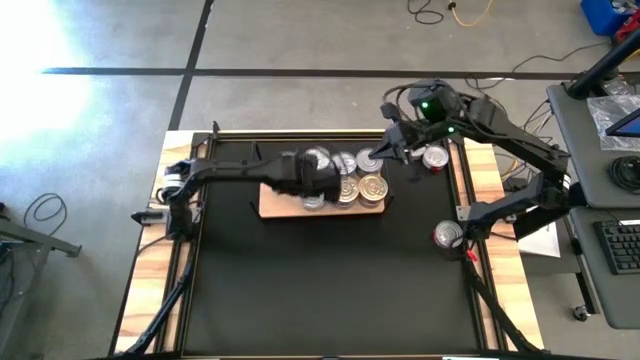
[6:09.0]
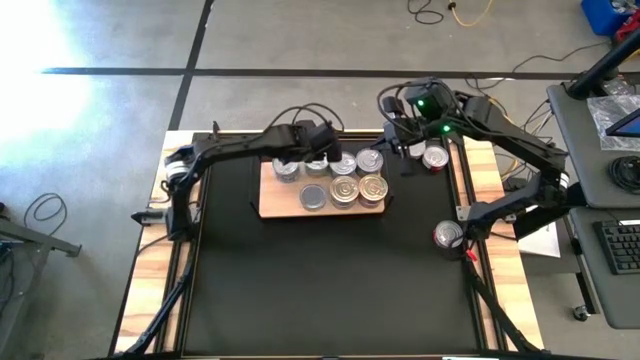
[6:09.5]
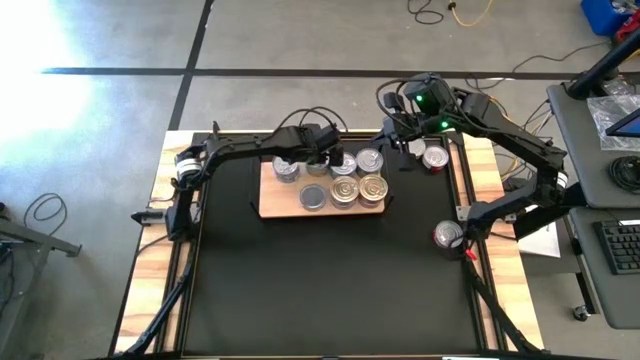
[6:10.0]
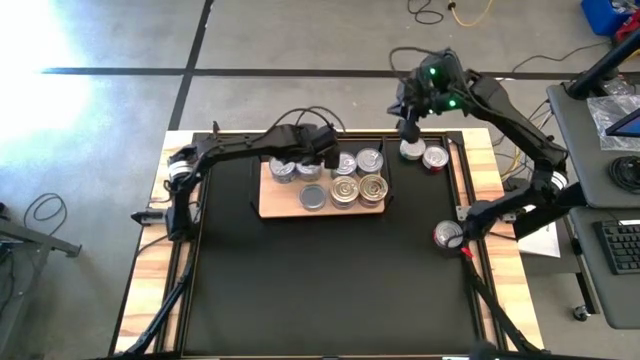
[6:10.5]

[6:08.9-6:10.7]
Task: Stack canned seafood by type on shelf
Adjust the stack of light blue tuna cans

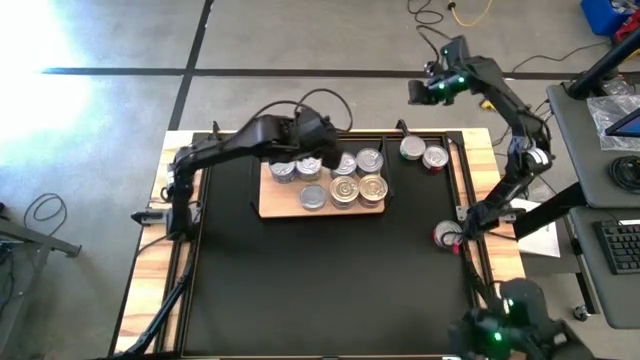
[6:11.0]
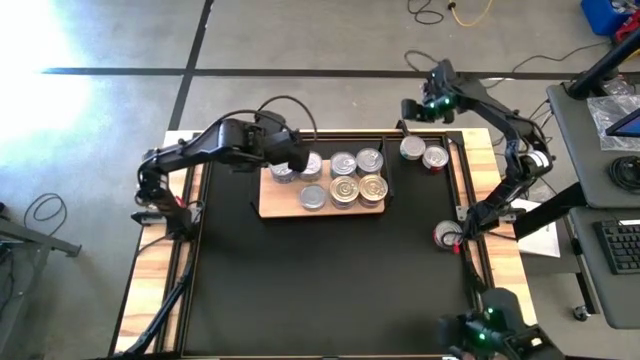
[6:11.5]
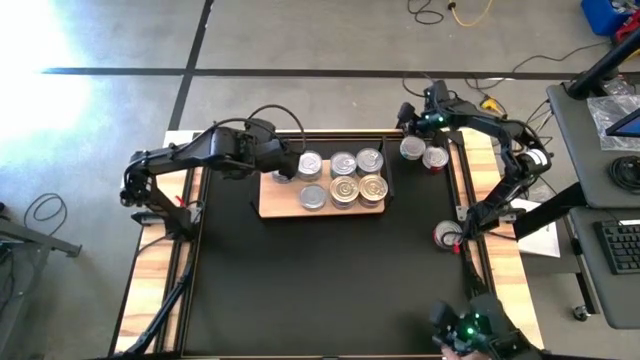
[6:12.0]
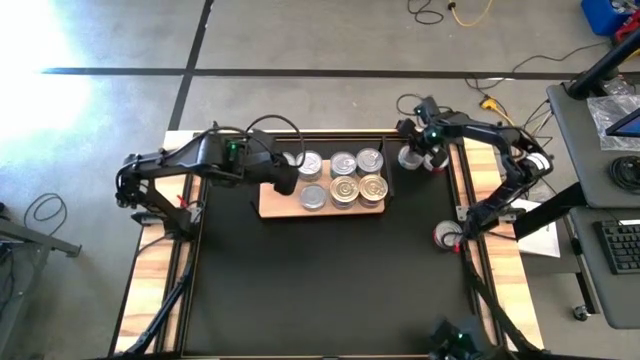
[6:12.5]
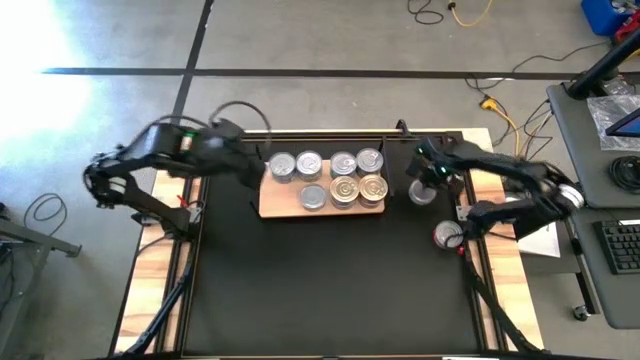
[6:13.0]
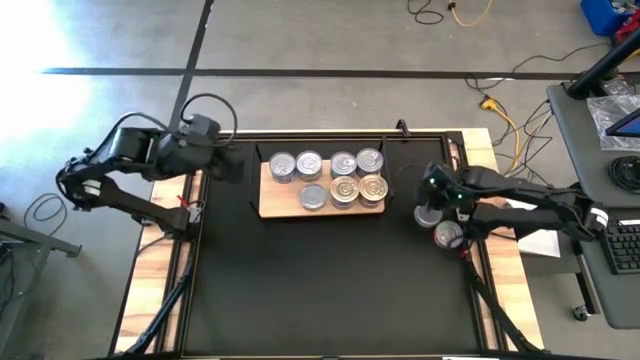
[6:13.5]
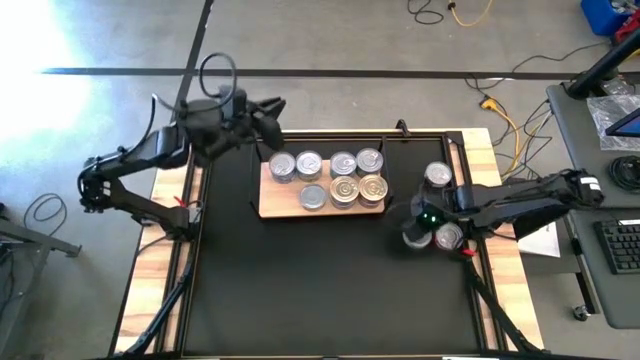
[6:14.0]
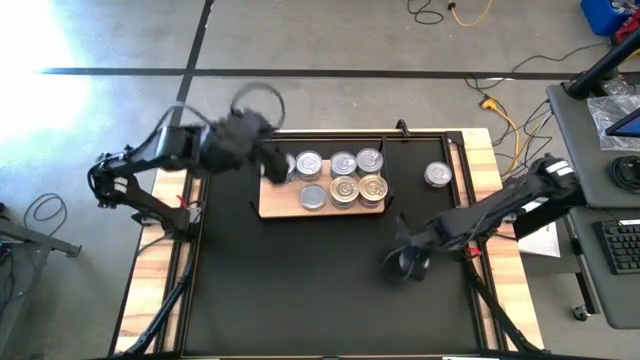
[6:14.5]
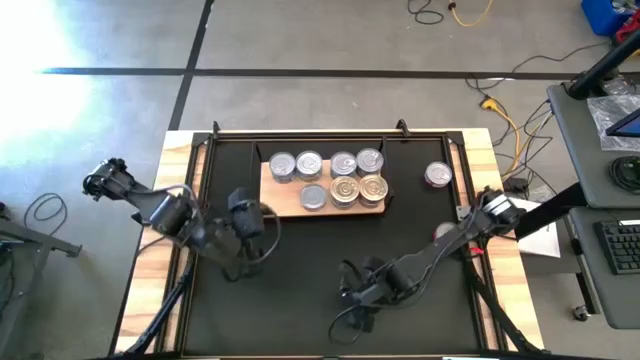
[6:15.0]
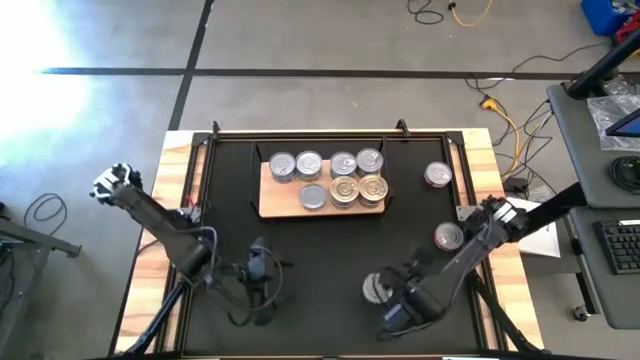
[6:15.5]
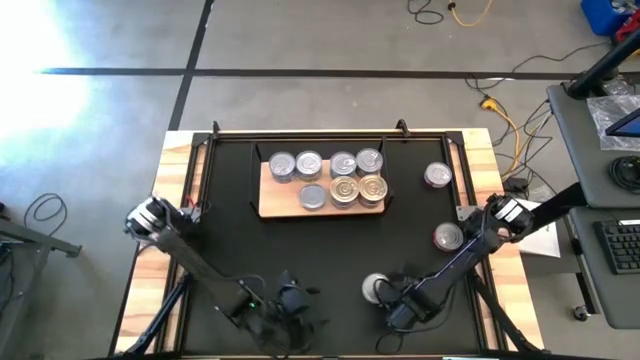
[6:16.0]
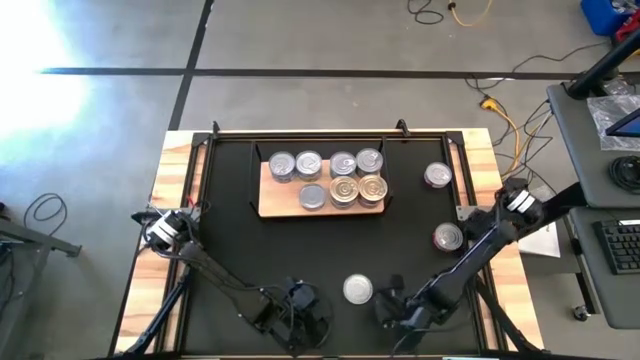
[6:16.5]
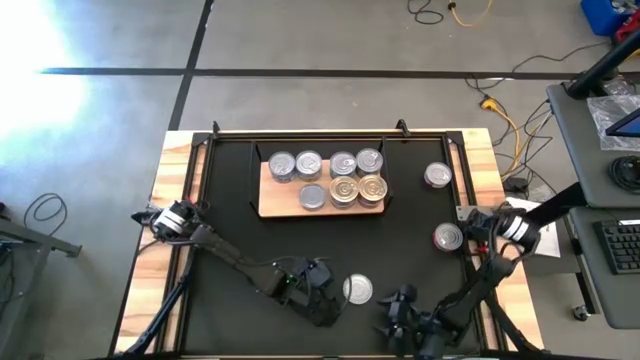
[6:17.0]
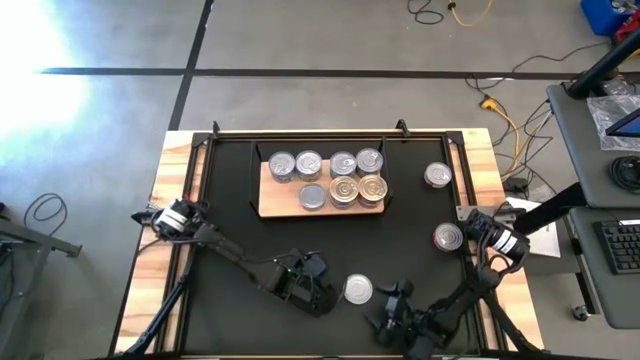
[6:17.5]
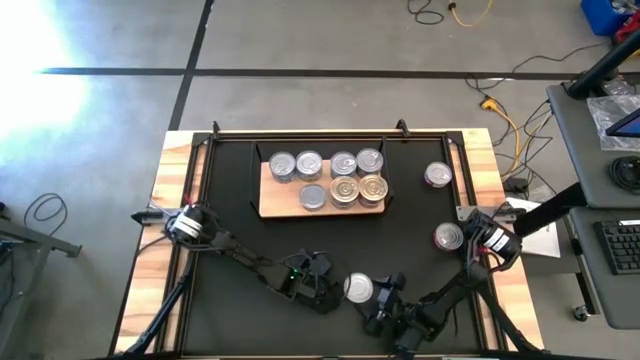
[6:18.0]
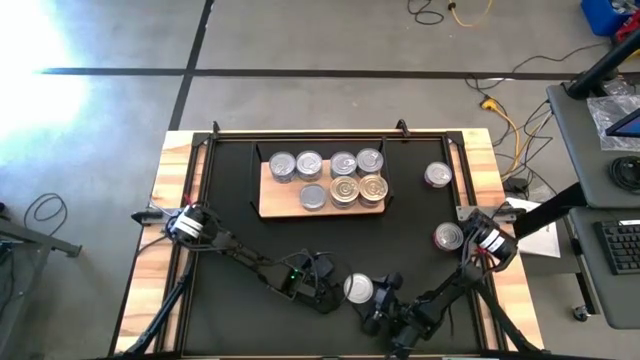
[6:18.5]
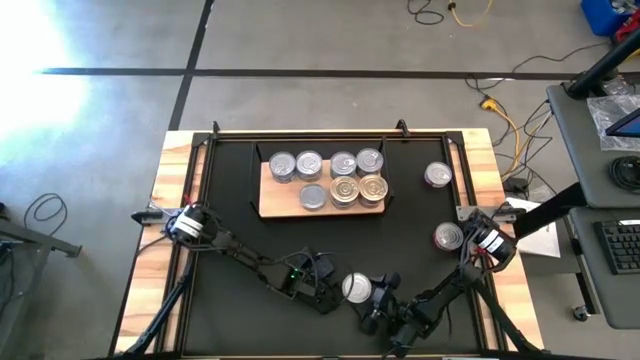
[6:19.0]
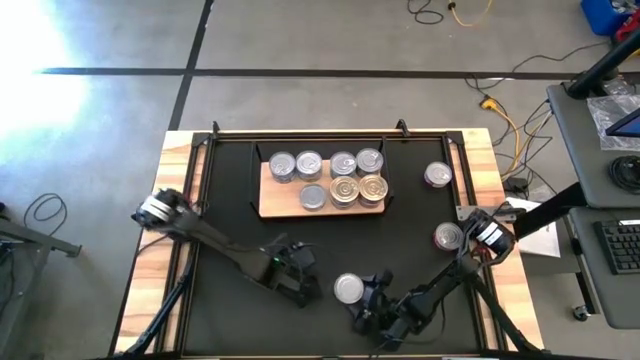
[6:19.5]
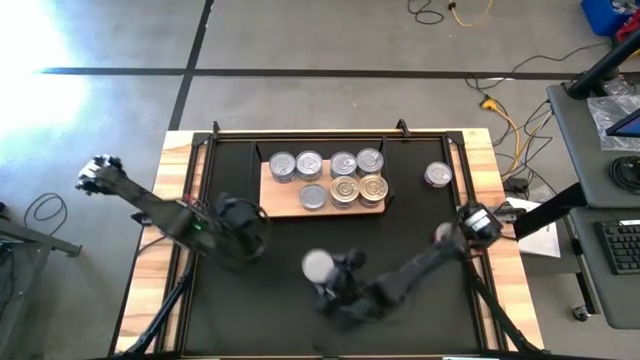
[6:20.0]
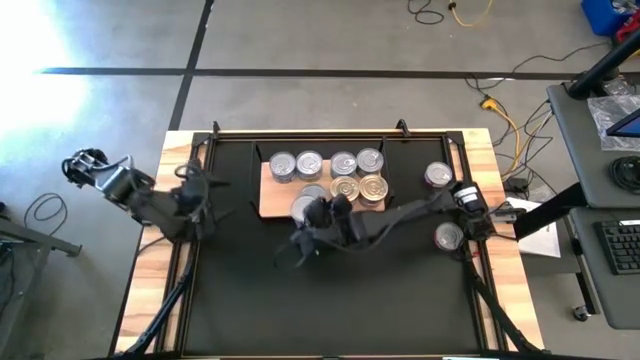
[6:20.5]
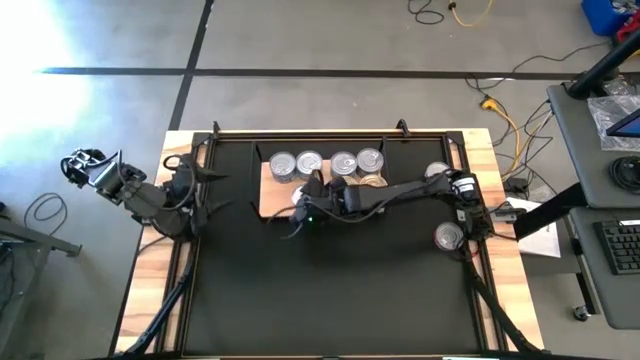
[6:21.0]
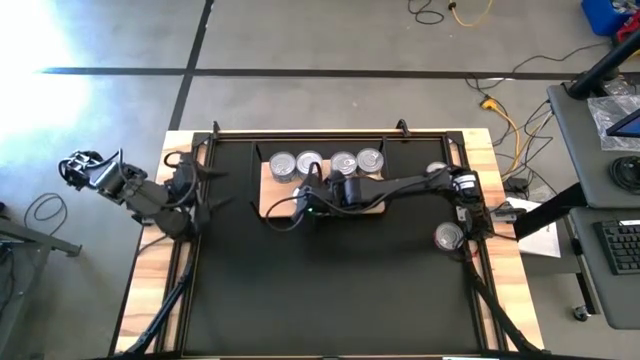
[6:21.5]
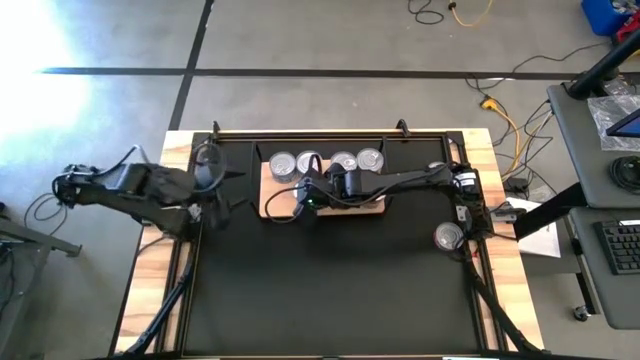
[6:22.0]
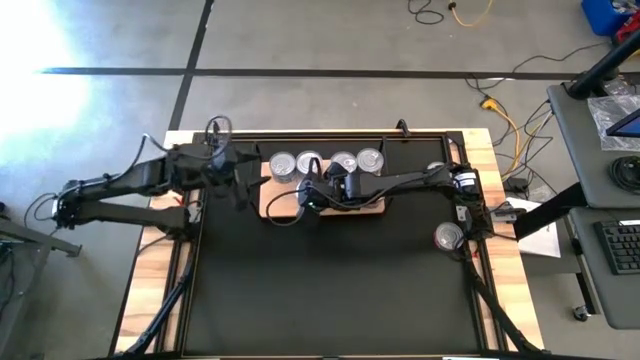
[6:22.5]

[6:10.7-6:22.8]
Stack the green and white tuna can on the green and white tuna can

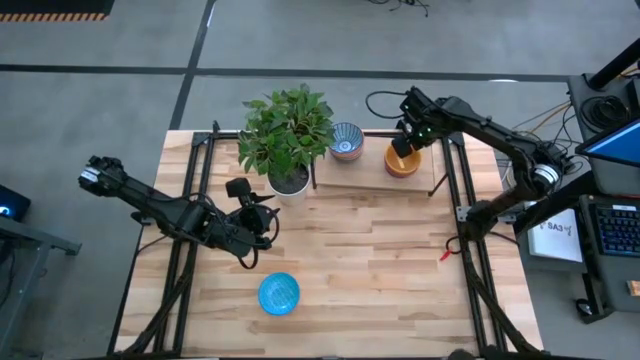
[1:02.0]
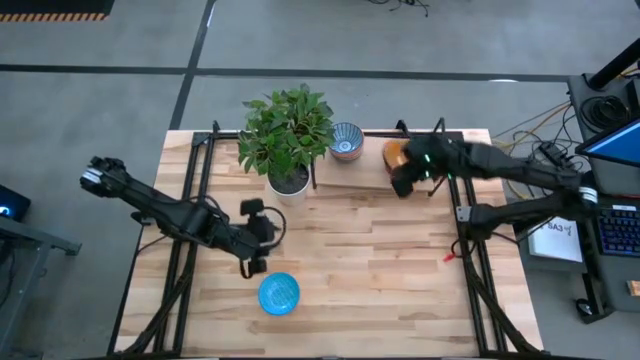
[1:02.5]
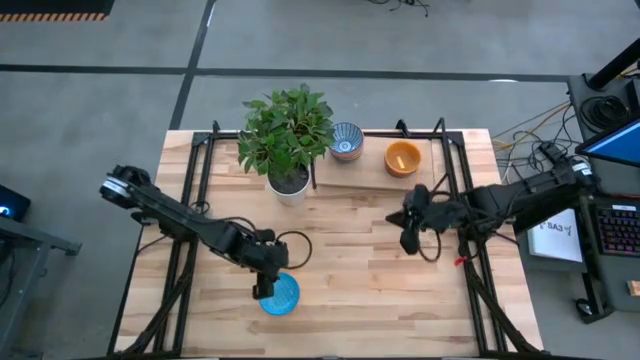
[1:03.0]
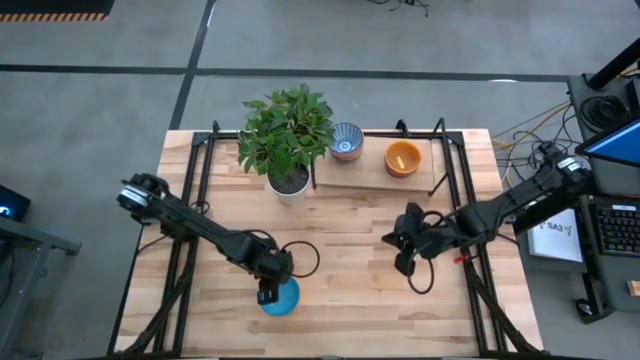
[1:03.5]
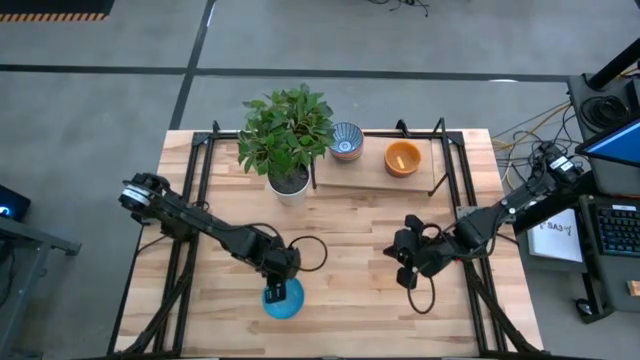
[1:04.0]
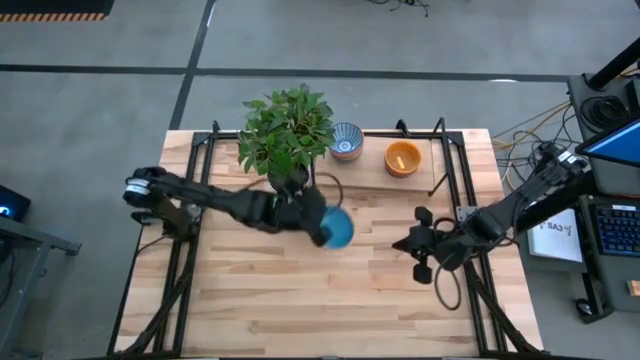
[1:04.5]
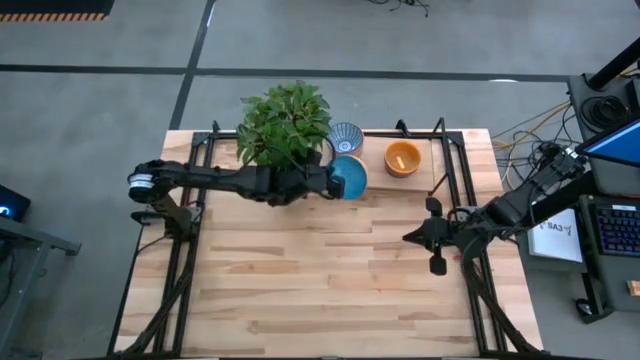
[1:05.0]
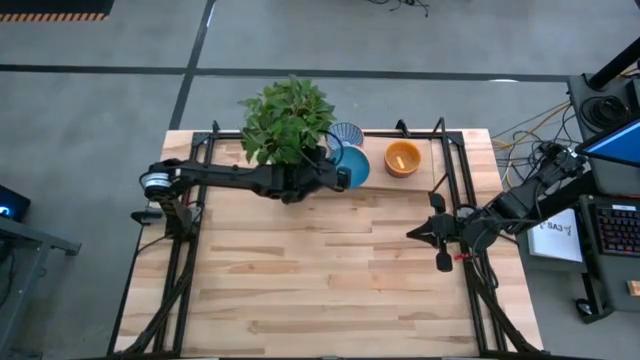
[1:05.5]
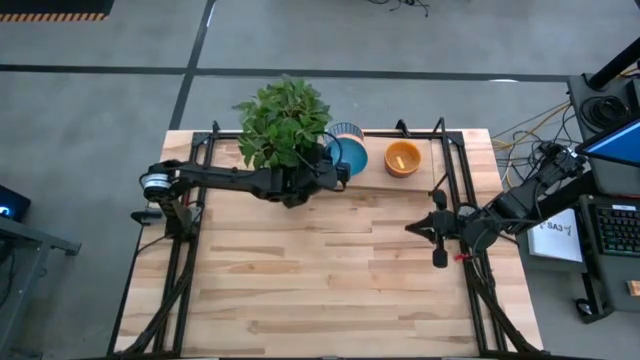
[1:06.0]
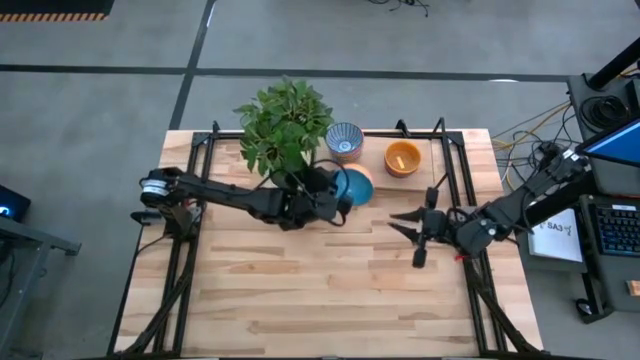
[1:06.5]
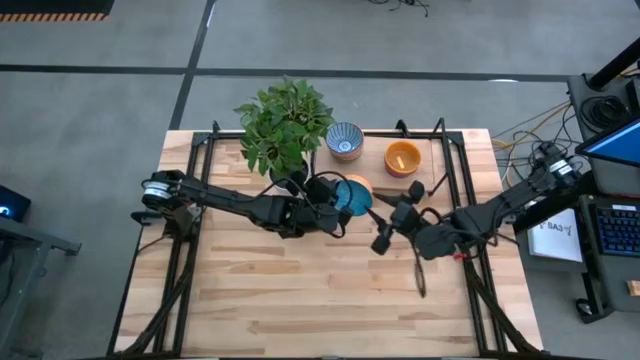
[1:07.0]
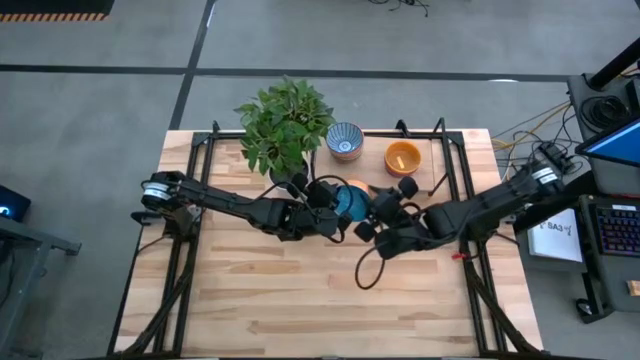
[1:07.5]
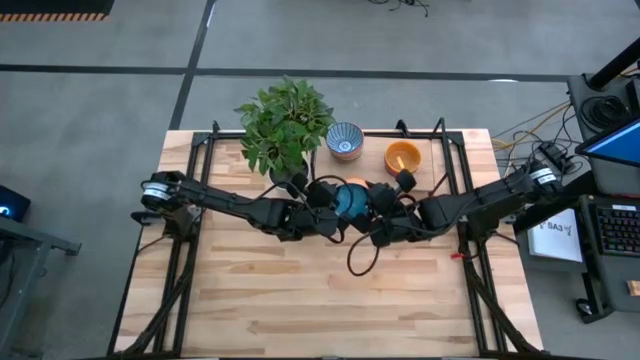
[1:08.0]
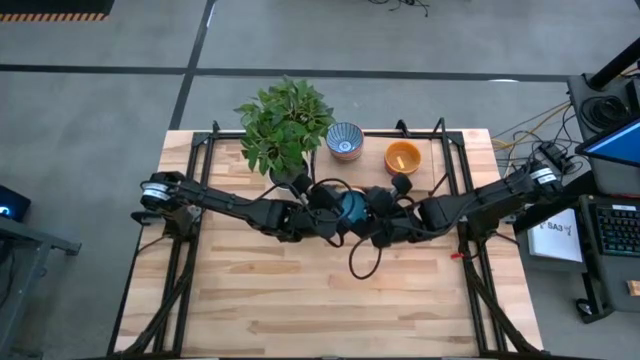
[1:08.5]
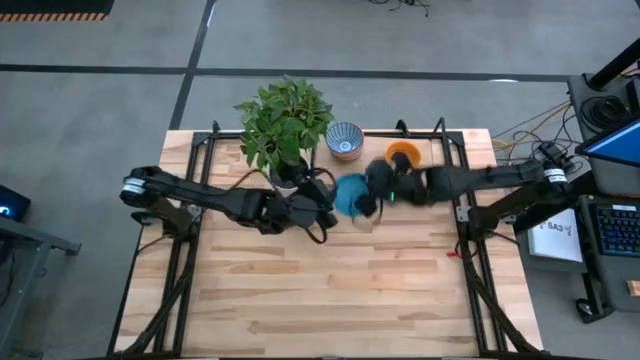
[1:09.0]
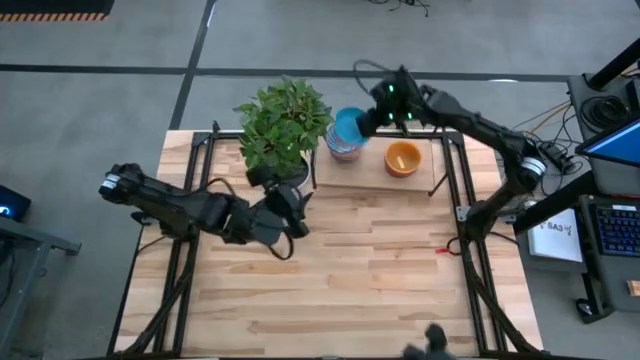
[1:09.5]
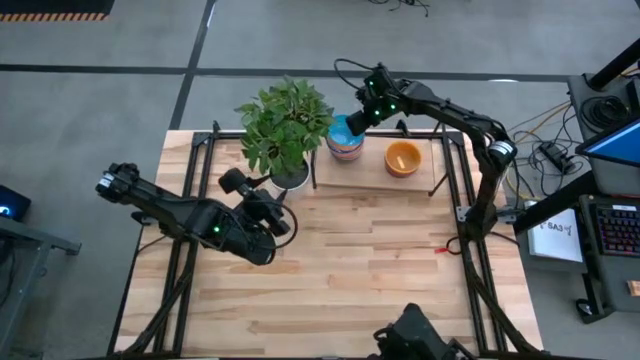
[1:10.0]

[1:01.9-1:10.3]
Task: Place and stack bowls onto a shelf
Stack the blue patterned bowl on the dark blue patterned bowl on the shelf
